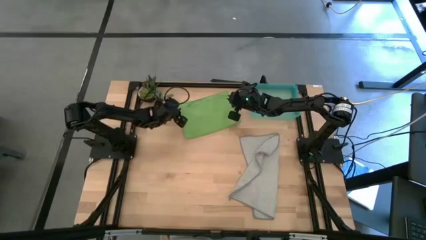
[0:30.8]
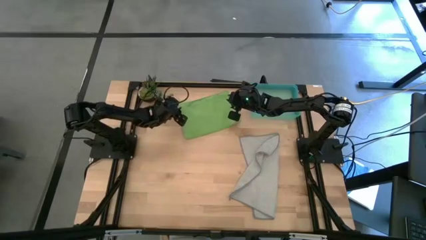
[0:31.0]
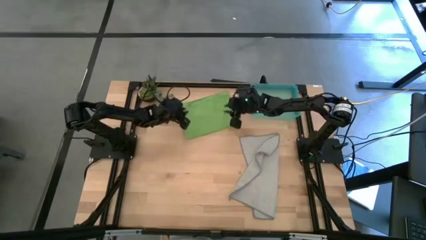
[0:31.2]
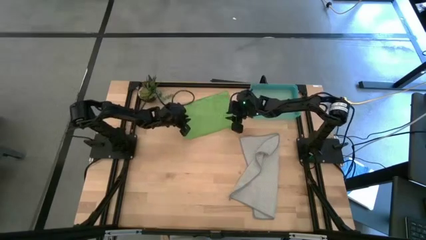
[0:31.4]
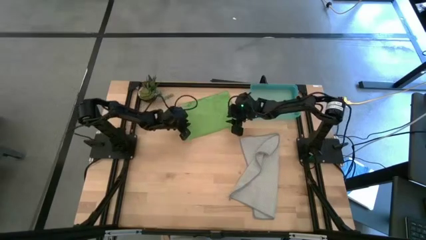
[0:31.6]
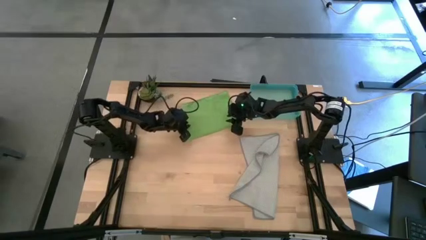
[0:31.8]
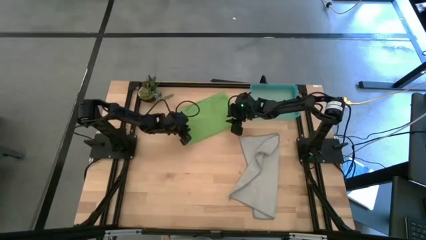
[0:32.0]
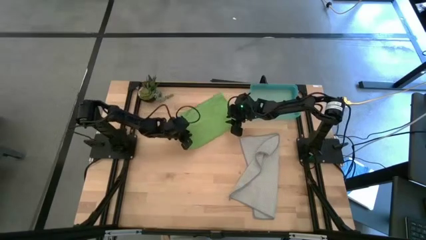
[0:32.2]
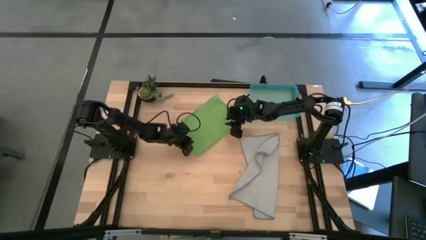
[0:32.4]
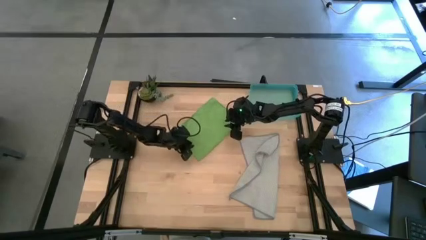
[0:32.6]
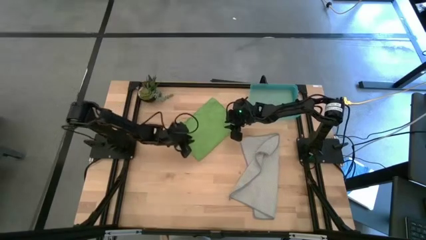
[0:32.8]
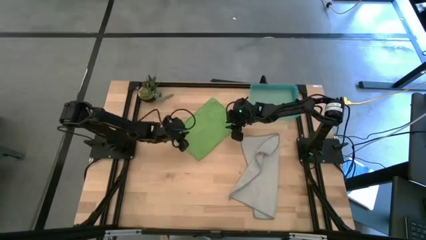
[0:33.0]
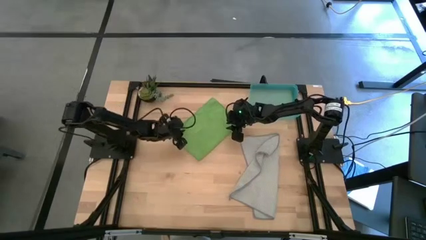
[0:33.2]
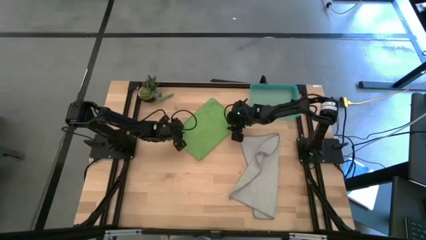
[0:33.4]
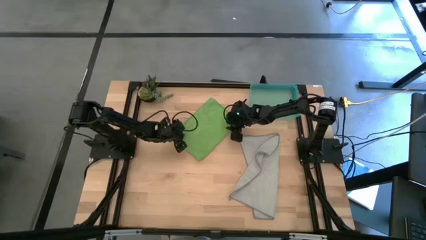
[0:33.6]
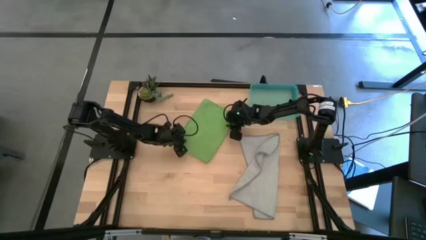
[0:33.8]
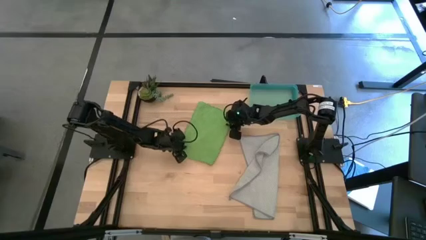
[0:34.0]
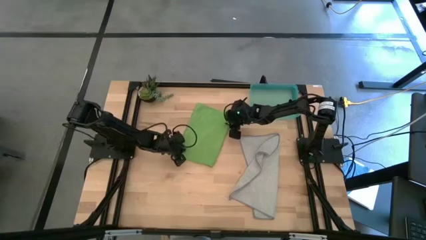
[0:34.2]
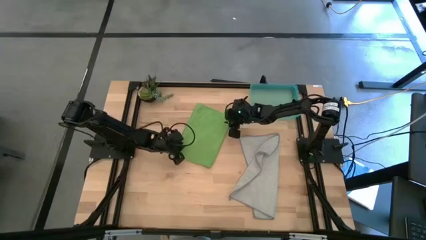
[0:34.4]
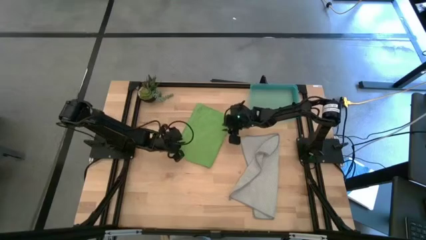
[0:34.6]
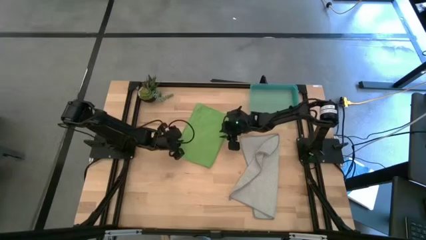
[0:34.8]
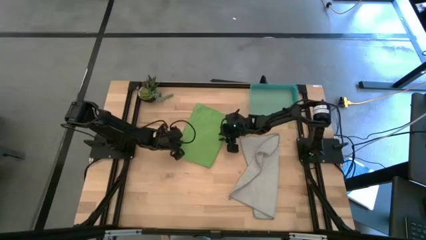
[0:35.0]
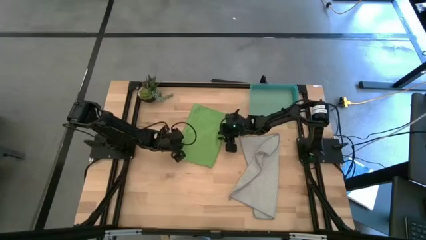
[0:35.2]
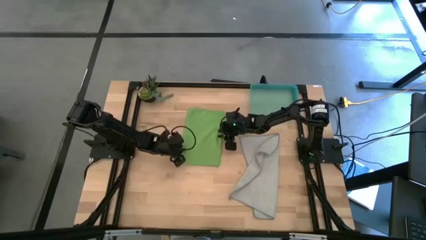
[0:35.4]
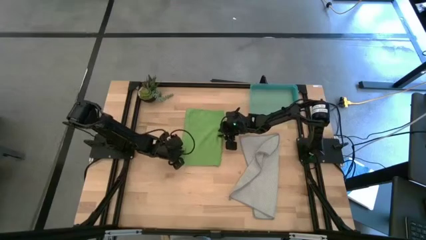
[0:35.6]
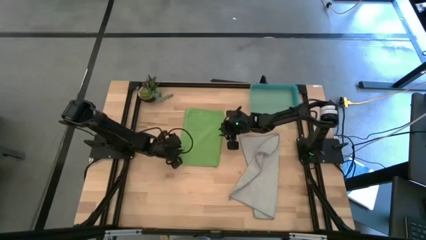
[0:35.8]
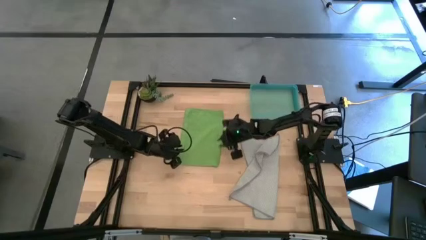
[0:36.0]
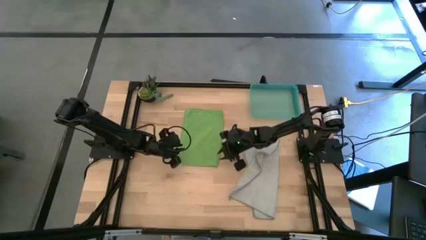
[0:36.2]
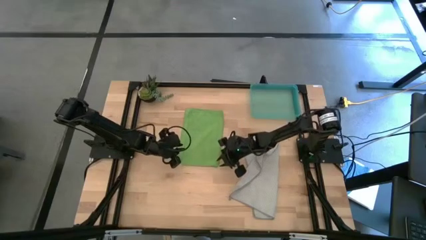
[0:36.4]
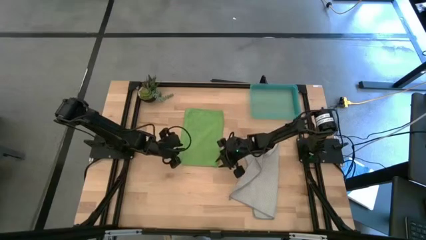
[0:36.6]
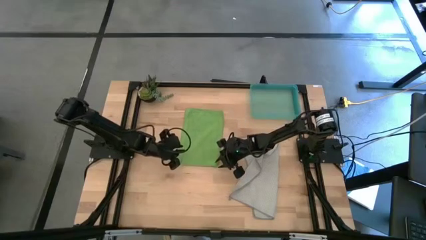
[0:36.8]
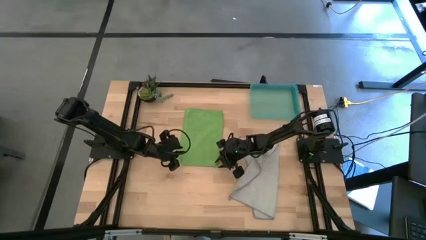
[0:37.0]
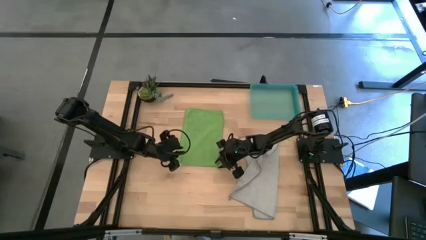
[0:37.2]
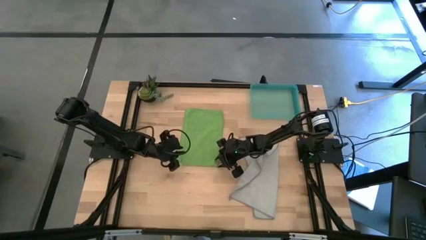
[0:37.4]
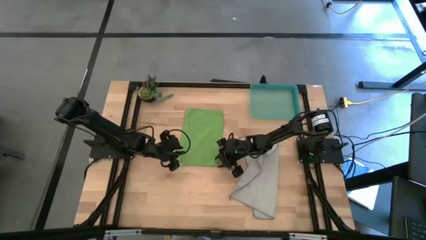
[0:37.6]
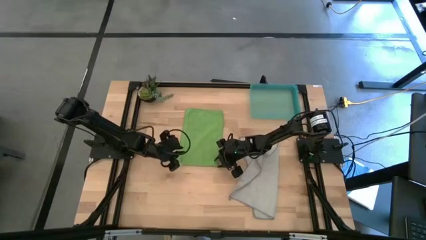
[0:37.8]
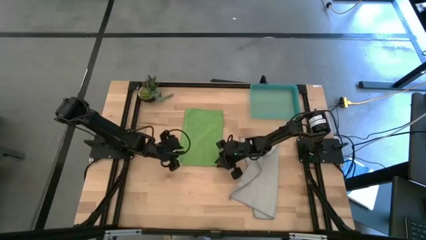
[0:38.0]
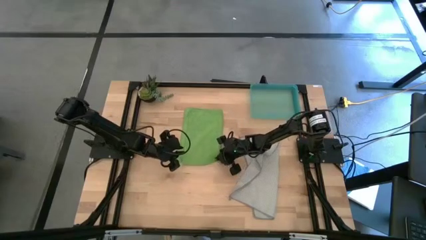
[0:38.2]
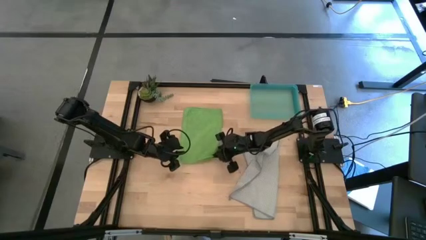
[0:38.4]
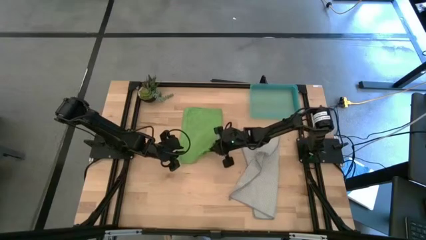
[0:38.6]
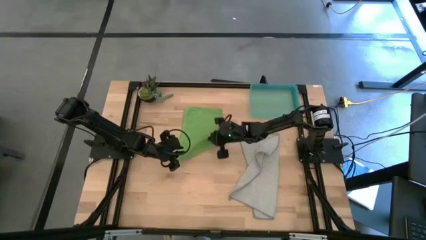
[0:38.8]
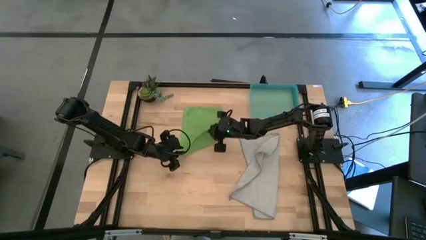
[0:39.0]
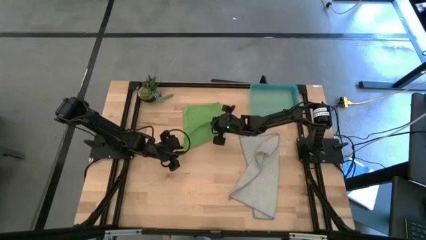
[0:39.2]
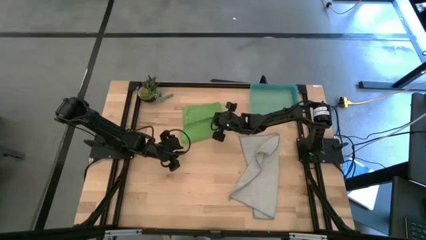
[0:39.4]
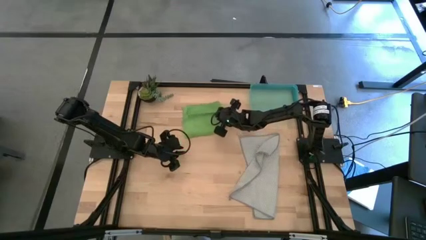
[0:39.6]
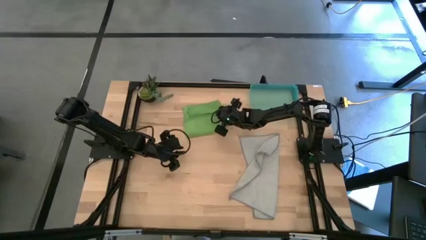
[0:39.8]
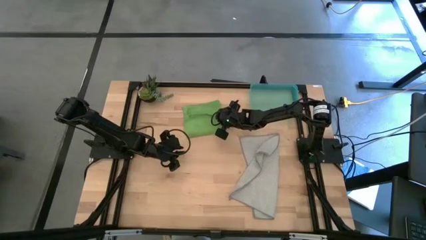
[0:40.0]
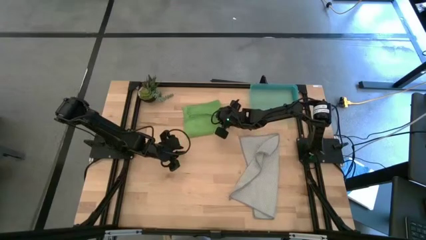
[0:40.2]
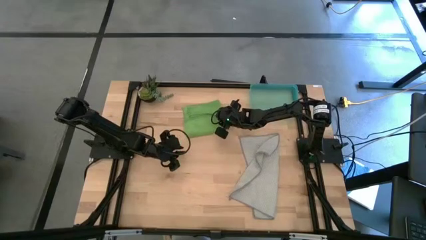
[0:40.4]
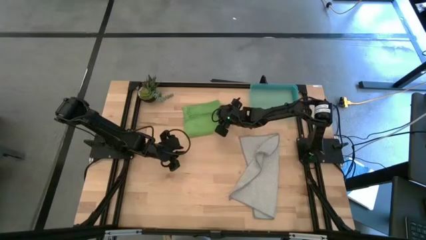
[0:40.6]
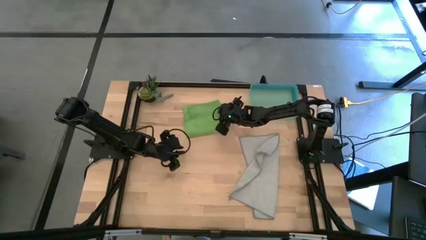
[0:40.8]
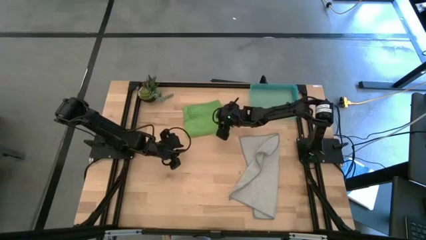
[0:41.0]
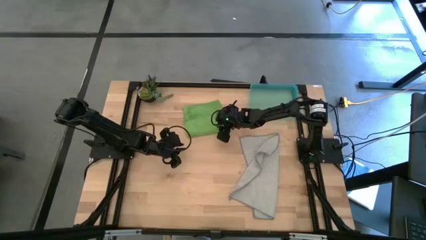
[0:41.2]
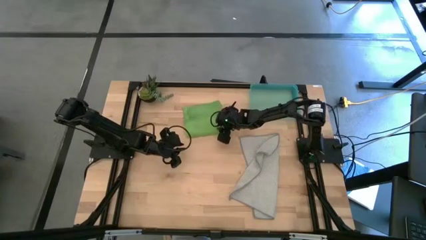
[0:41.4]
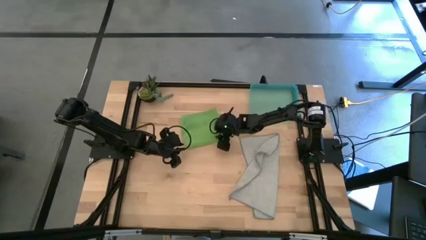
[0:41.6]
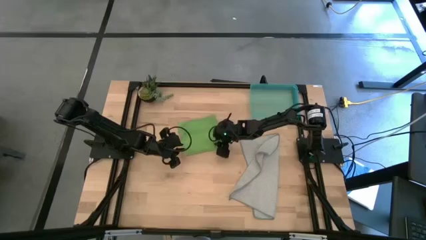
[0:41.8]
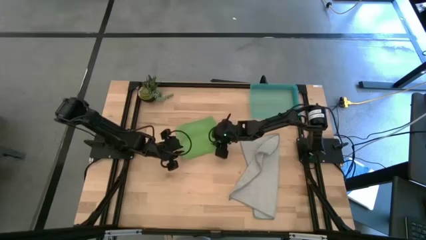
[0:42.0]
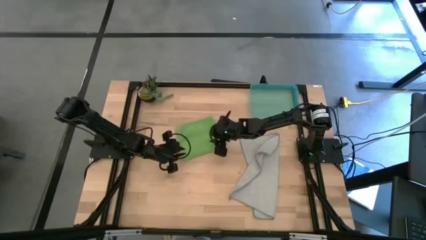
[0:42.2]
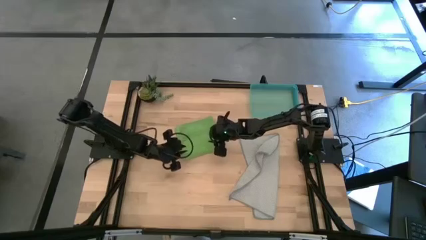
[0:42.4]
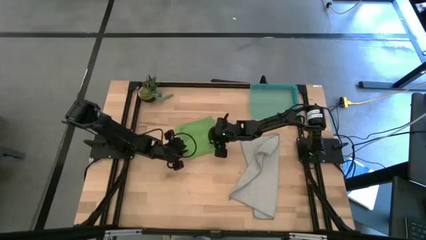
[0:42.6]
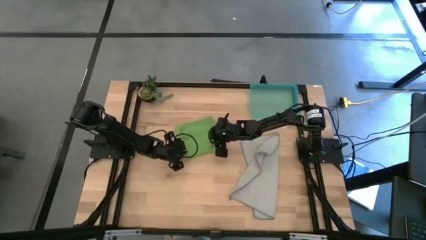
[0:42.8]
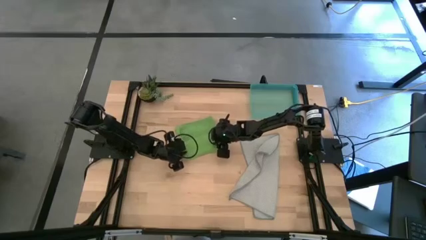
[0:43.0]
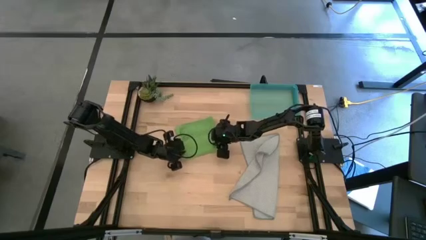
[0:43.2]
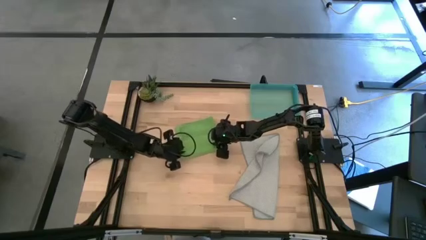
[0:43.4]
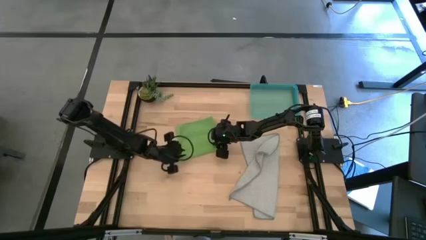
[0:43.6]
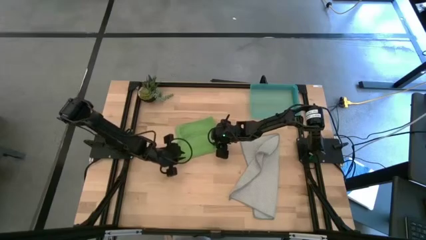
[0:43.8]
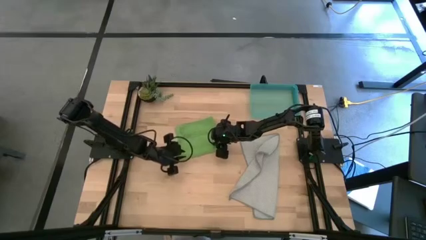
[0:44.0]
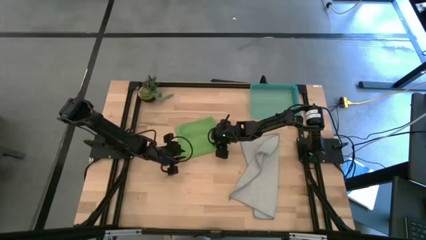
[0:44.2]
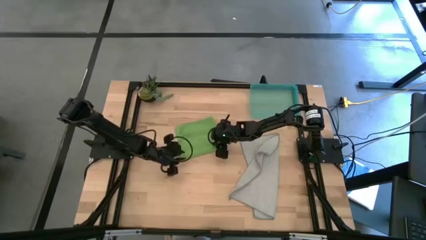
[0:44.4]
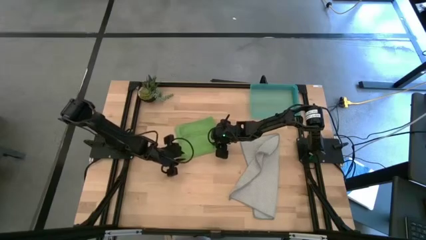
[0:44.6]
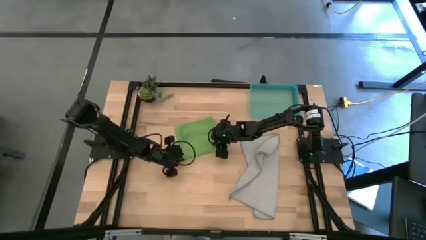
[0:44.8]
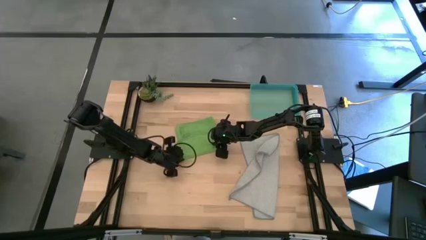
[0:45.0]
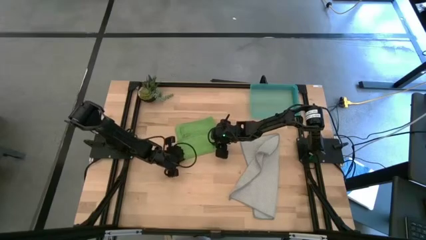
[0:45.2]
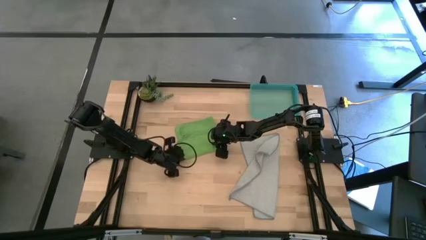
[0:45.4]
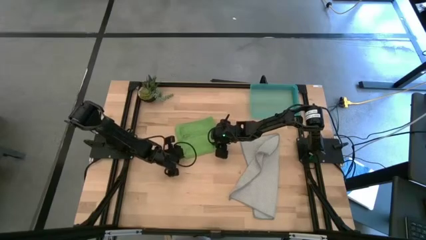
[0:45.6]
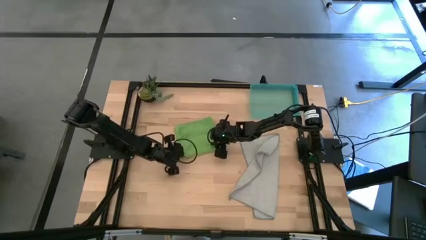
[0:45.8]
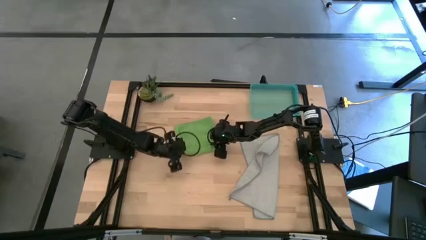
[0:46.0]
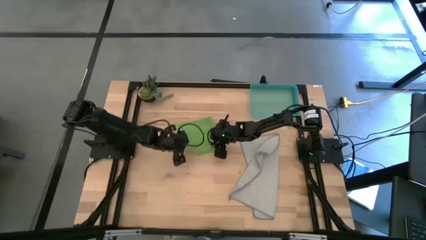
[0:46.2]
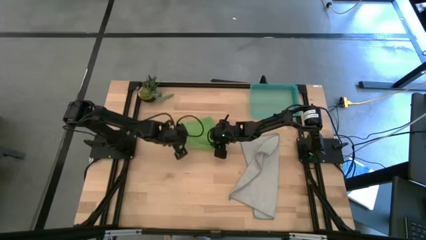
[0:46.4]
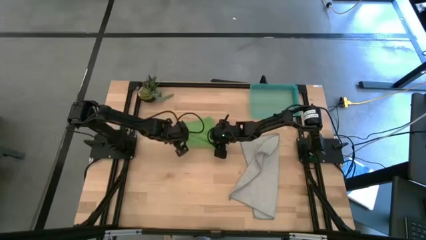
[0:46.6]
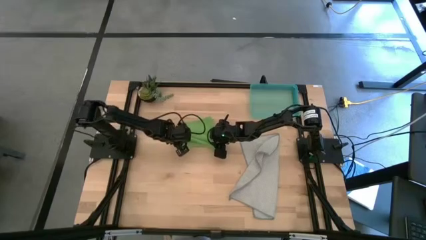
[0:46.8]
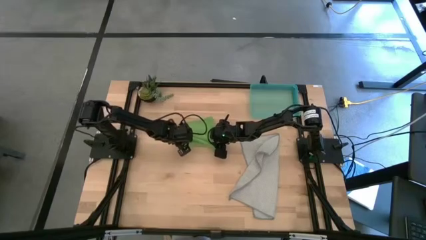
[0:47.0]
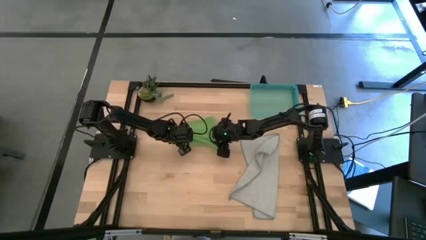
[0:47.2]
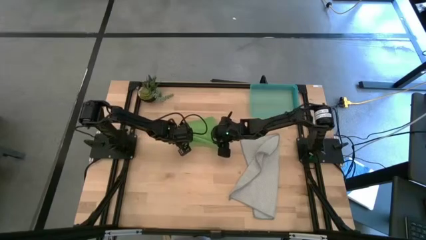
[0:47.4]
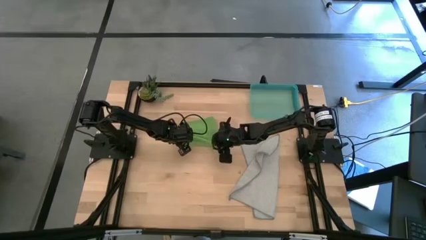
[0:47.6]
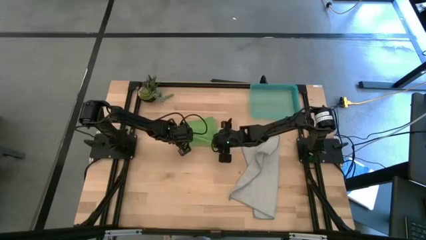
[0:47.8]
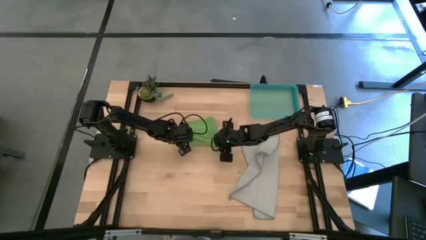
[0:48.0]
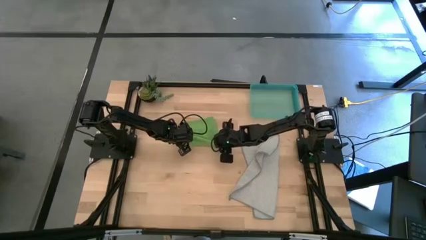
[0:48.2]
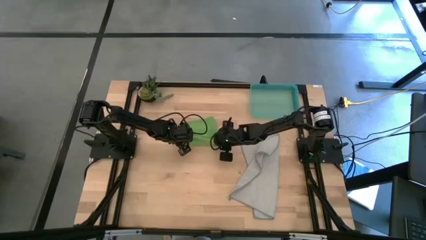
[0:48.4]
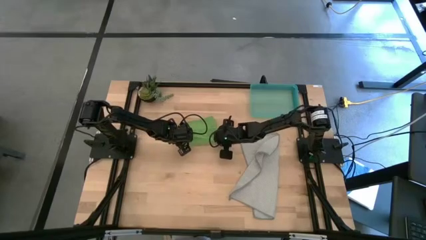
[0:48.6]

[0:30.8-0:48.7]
Task: Roll microfiber towels into tight, uniform cylinder then place into a basket
Roll the green microfiber cloth
